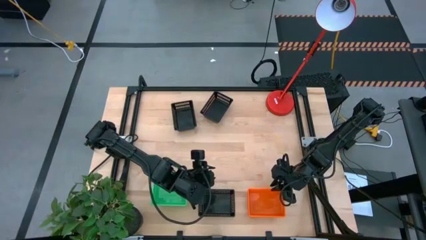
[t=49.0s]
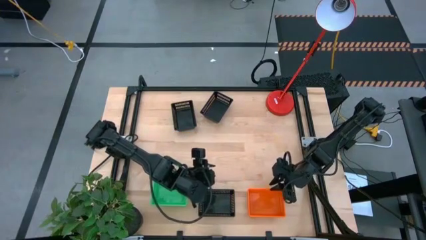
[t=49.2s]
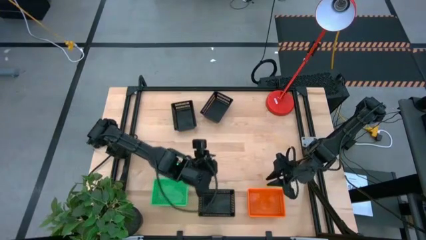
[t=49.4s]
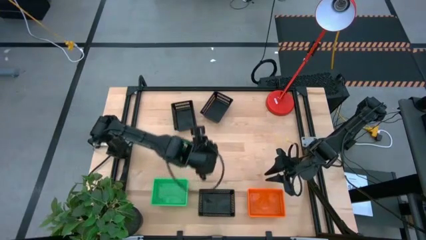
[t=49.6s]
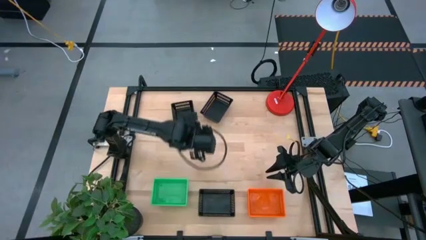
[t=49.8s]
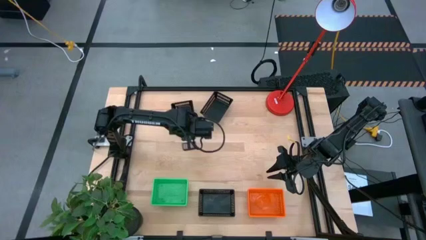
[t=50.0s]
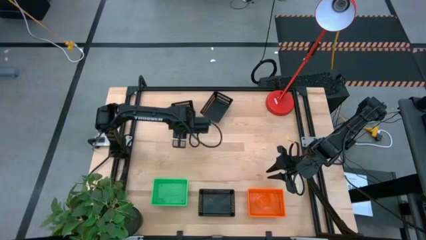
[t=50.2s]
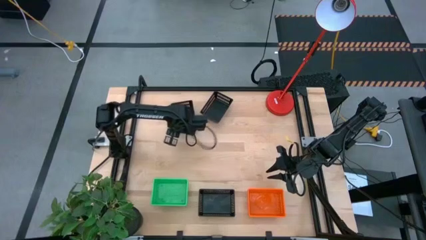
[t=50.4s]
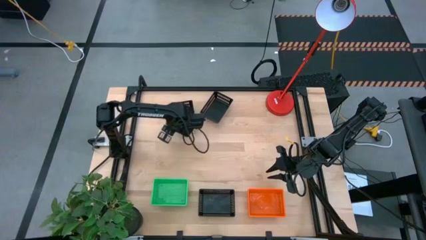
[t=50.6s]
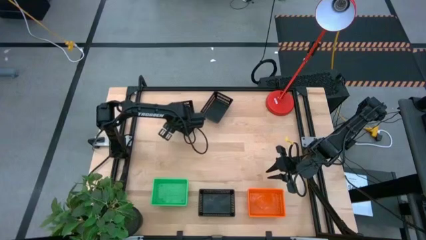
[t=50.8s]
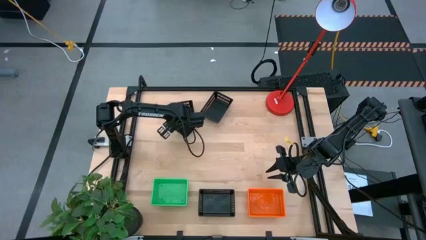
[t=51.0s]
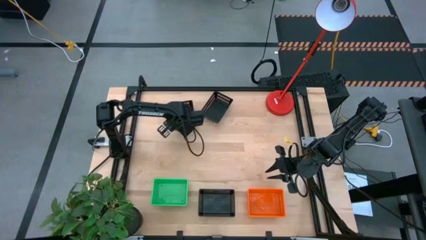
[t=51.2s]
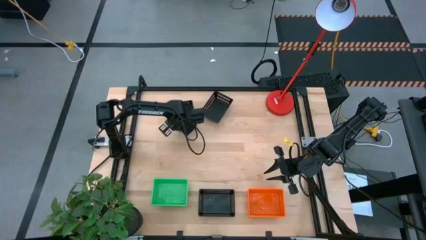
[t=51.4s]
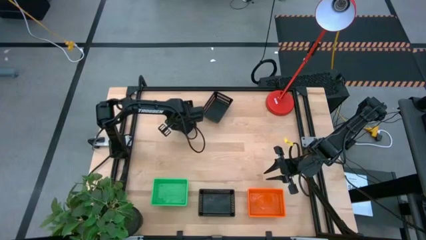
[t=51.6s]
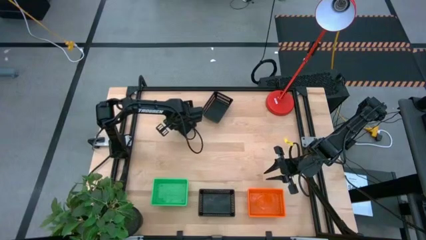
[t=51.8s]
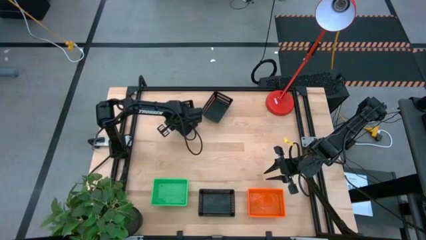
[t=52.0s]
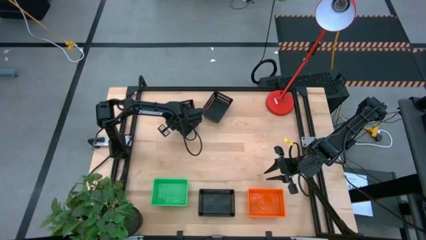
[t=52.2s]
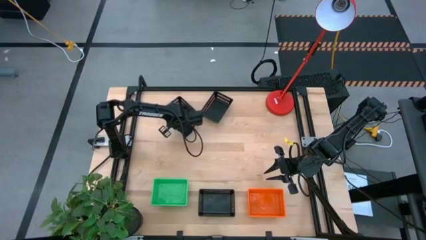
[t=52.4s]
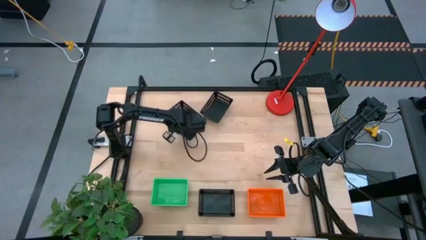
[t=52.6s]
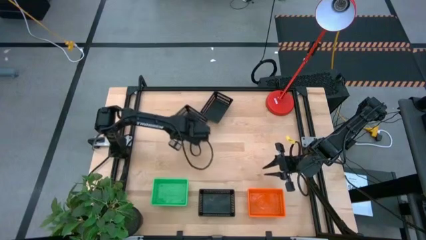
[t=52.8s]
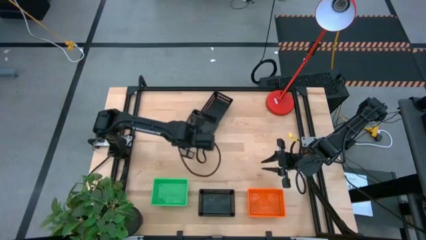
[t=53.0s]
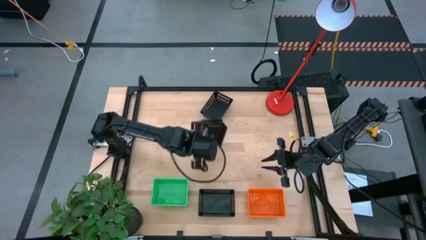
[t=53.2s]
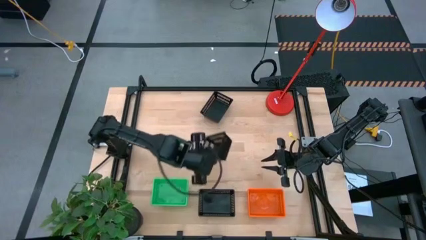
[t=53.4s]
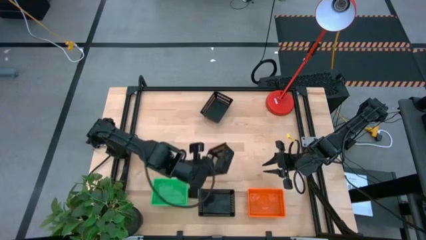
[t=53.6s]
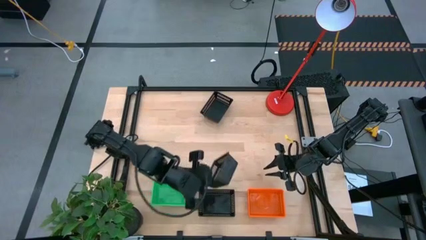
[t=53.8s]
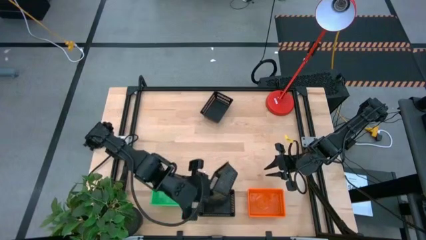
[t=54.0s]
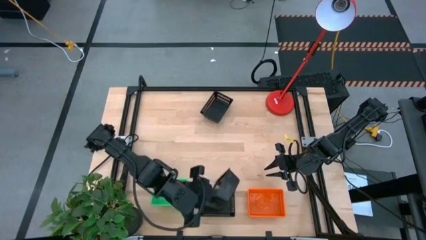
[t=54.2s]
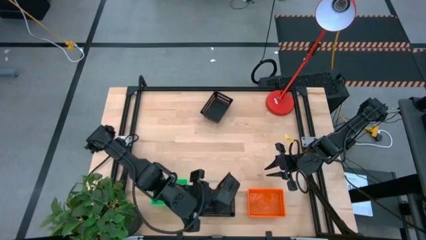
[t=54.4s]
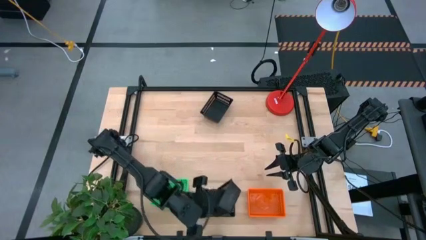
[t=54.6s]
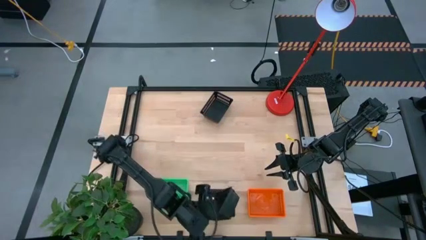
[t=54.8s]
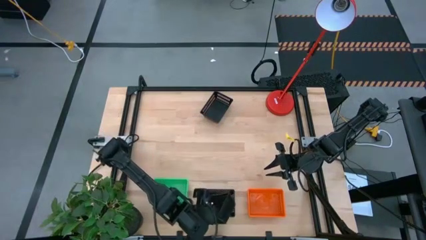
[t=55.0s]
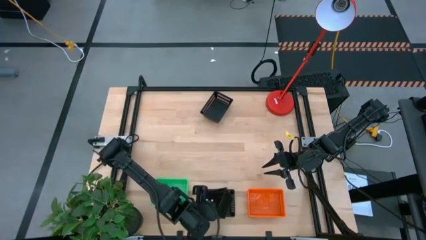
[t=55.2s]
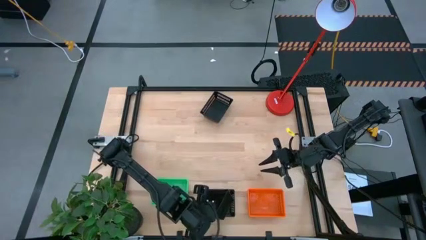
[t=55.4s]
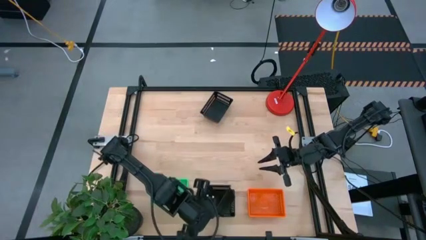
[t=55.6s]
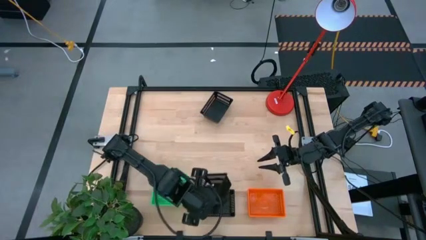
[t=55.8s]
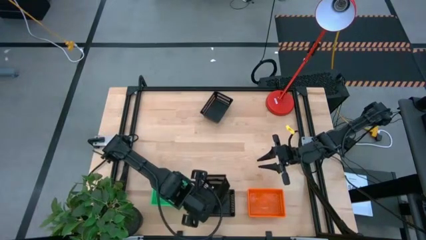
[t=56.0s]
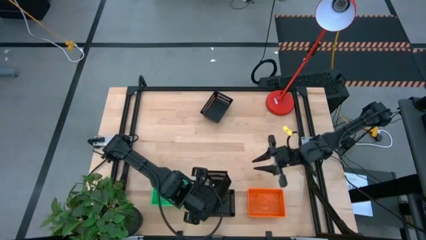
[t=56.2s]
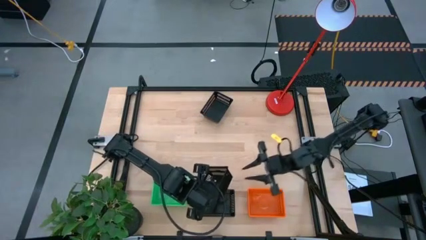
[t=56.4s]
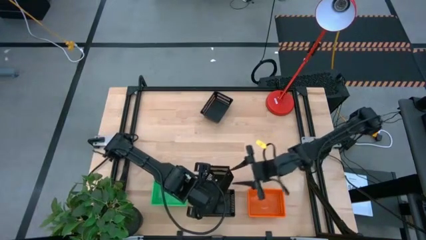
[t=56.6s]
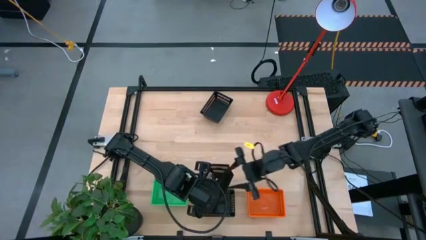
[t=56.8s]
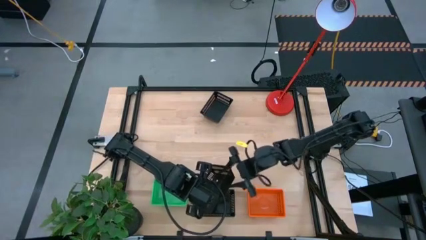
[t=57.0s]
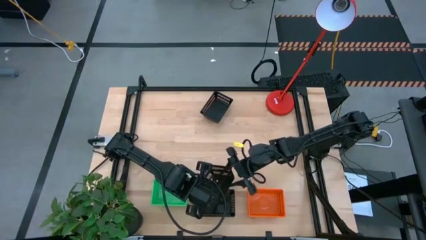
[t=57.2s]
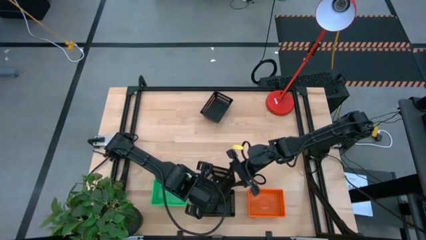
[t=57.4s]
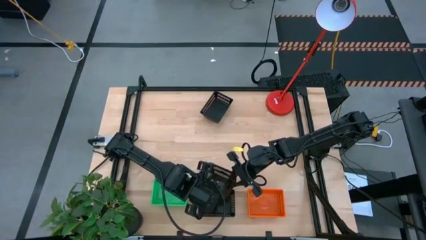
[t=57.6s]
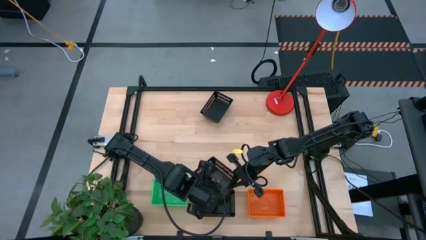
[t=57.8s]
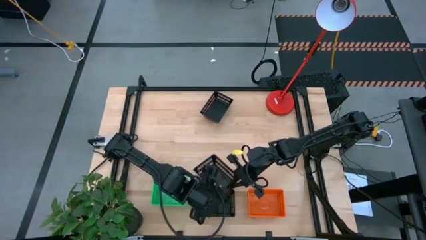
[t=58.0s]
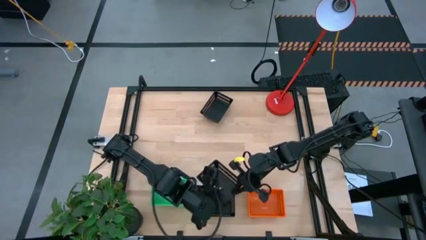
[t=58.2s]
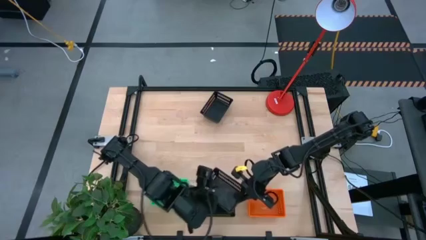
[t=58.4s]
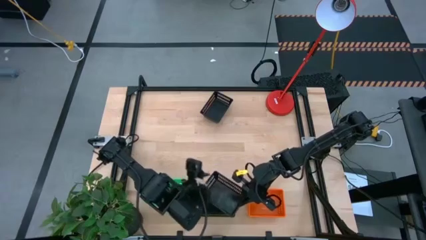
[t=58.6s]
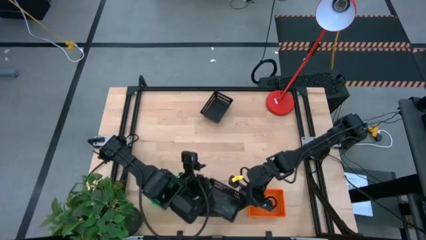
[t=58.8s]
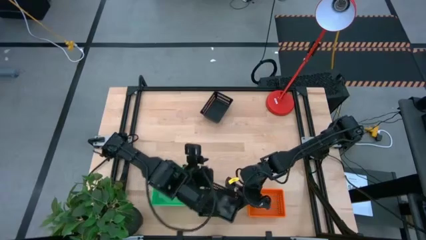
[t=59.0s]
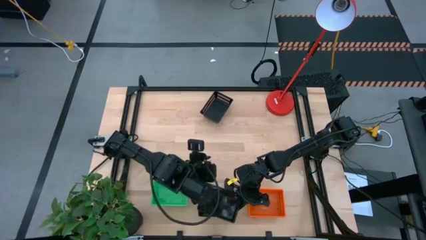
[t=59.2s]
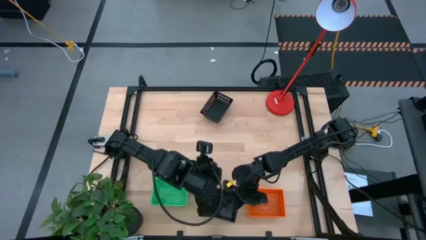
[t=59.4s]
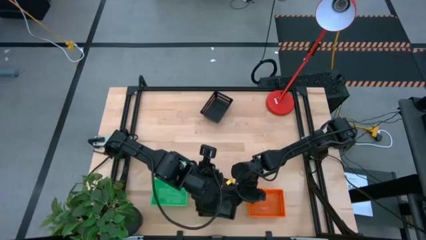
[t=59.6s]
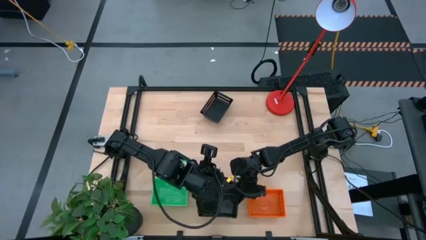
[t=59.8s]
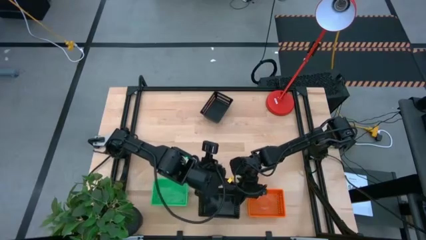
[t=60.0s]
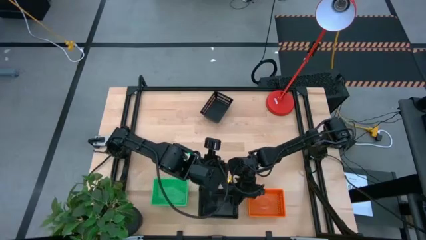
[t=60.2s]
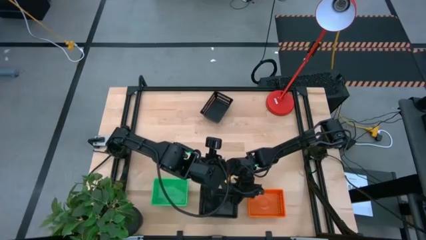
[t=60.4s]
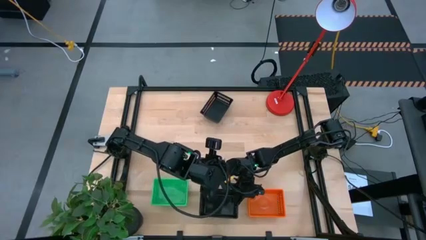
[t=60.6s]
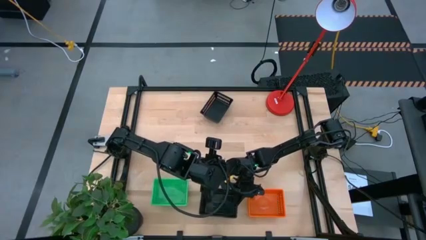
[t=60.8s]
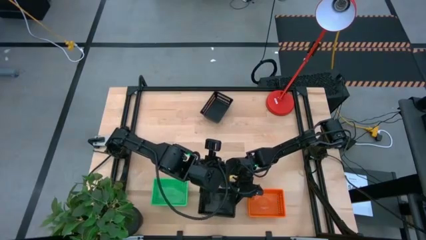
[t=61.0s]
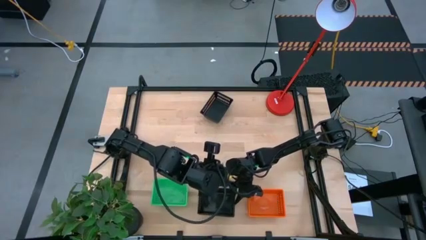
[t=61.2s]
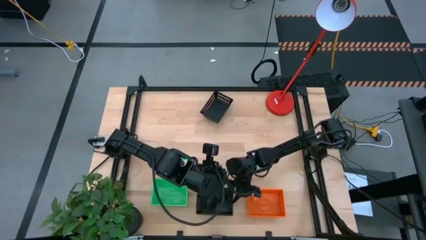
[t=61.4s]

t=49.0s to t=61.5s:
Stack the top left black bin on top of the bottom black bin

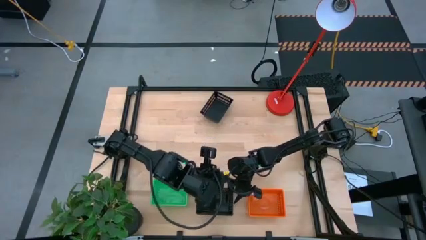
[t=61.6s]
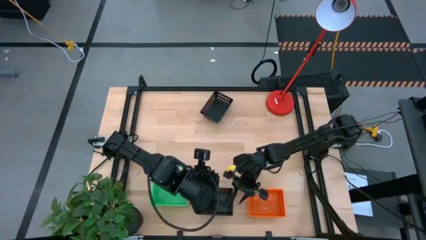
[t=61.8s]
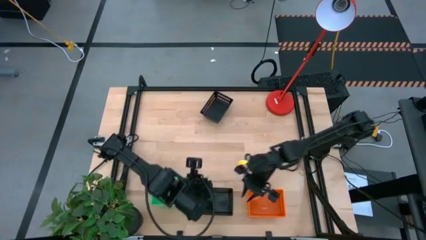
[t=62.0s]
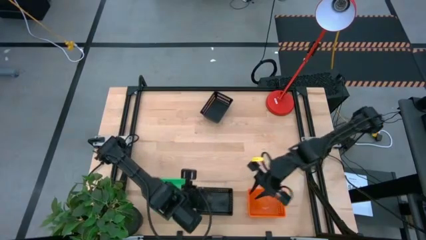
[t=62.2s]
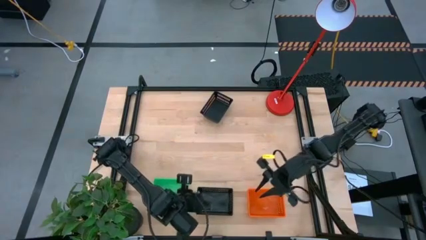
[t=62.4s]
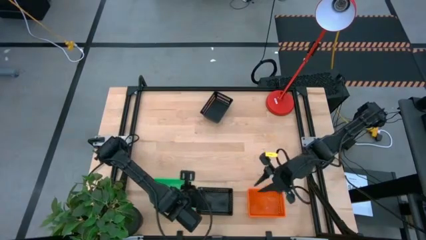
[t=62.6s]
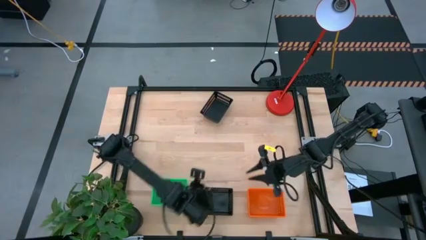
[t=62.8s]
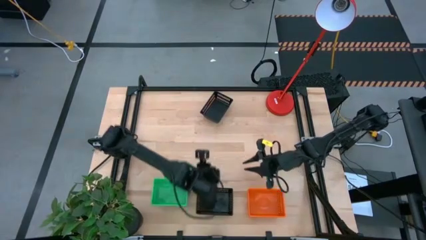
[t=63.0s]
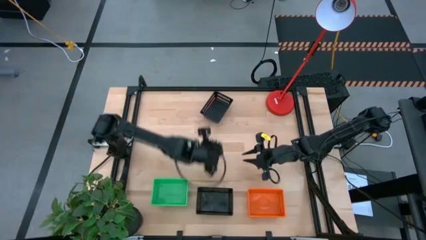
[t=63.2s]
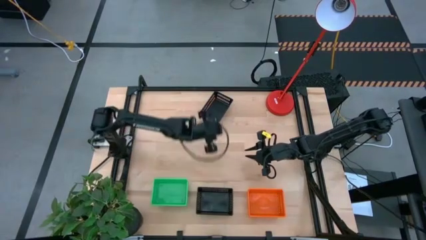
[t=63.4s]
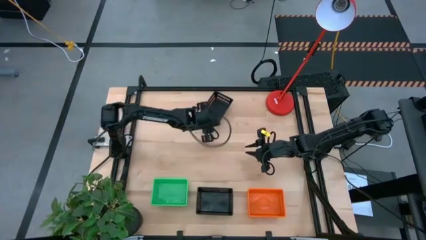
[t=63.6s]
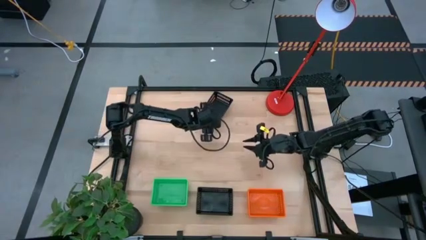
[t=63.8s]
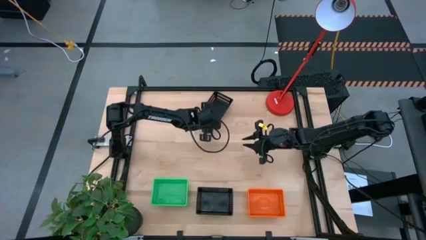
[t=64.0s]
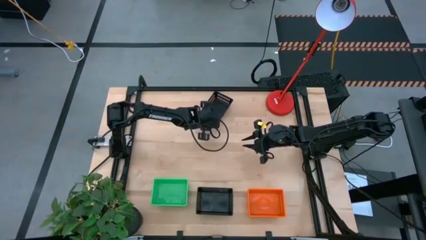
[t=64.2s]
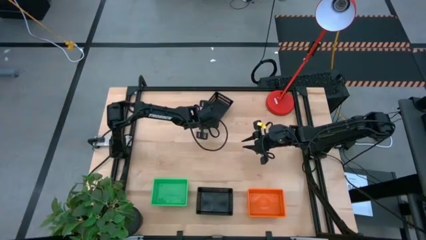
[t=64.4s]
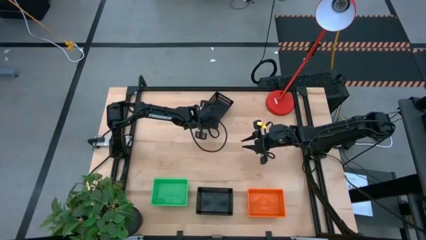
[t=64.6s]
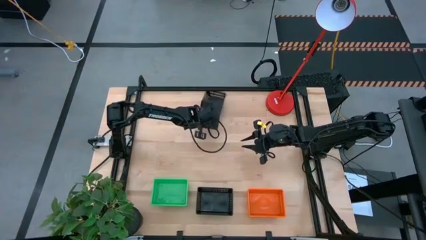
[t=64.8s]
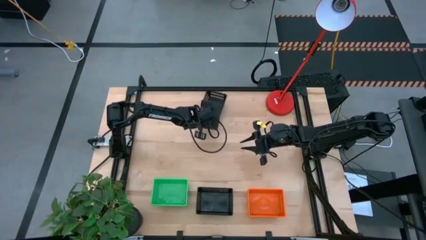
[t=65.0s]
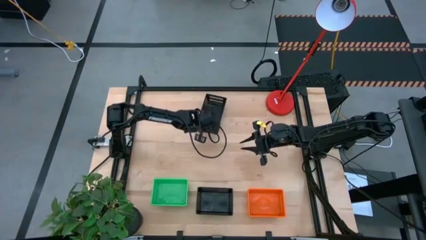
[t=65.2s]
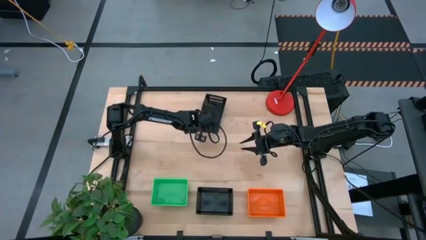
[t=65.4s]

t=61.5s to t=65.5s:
Stack the top black bin on top of the bottom black bin
